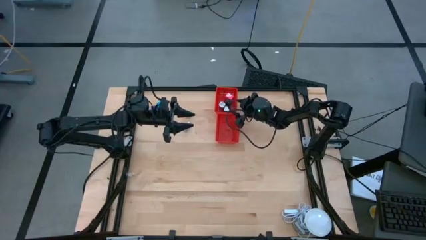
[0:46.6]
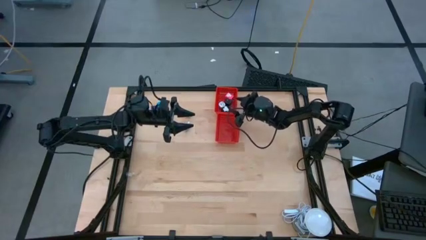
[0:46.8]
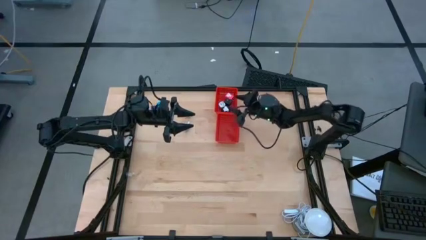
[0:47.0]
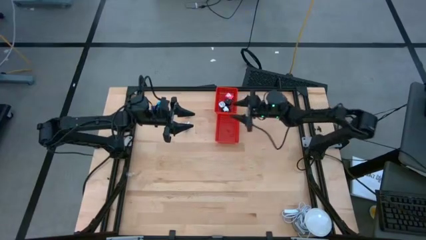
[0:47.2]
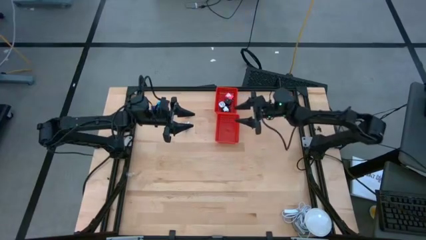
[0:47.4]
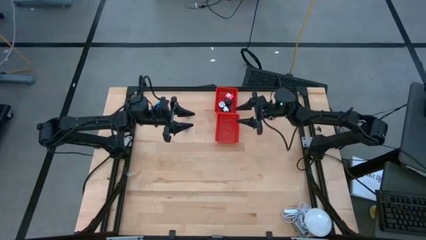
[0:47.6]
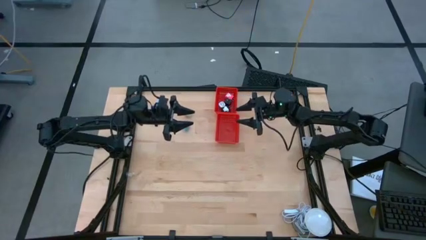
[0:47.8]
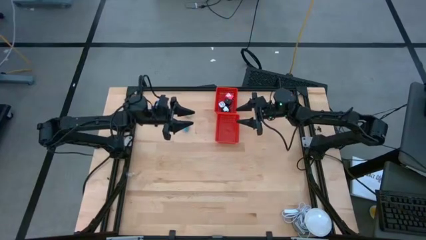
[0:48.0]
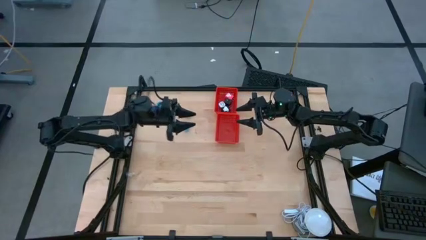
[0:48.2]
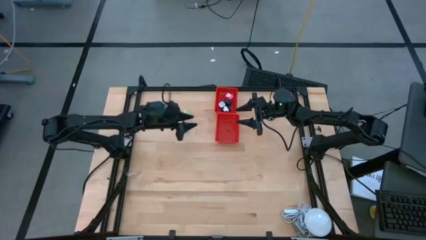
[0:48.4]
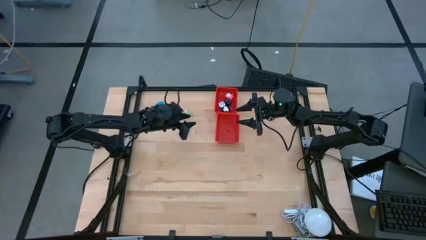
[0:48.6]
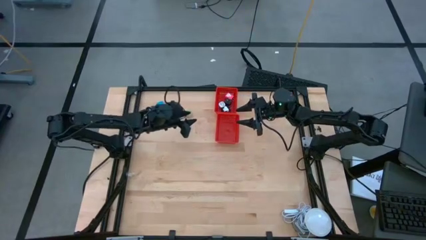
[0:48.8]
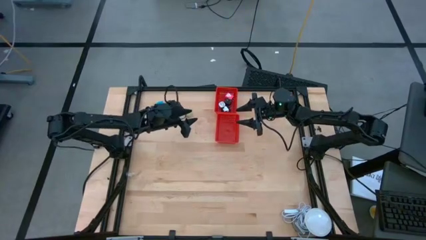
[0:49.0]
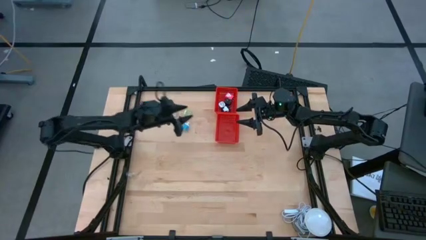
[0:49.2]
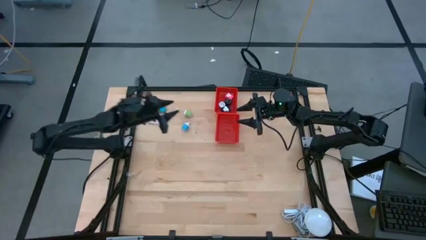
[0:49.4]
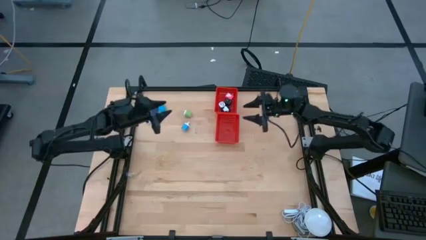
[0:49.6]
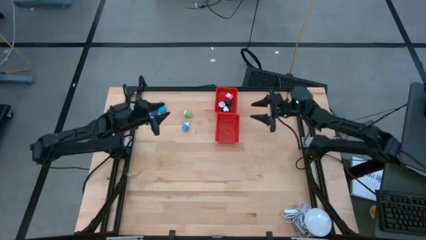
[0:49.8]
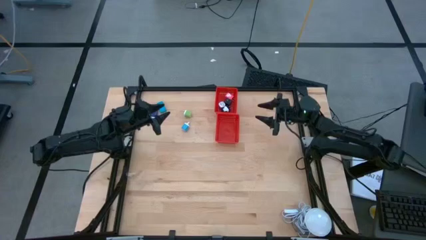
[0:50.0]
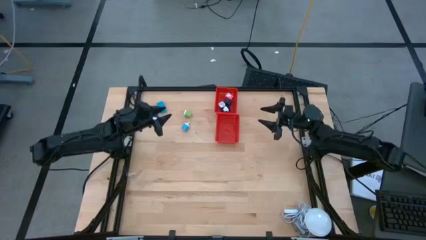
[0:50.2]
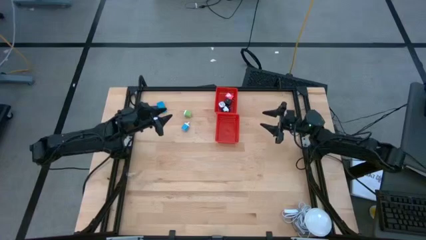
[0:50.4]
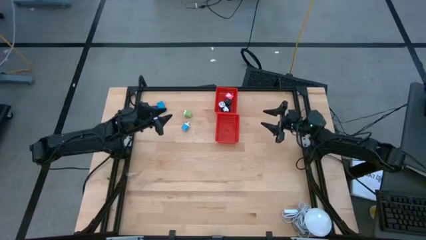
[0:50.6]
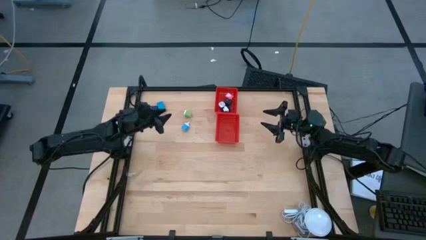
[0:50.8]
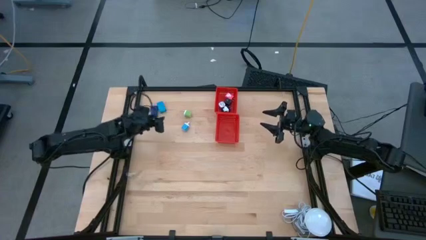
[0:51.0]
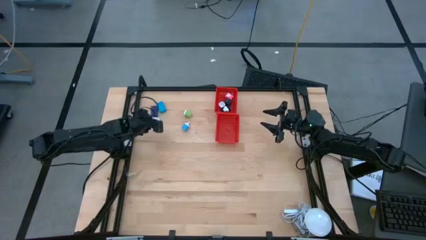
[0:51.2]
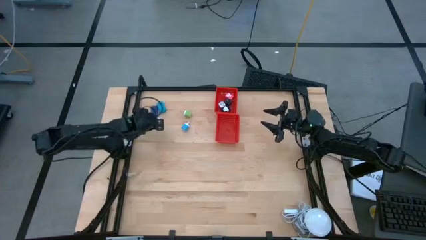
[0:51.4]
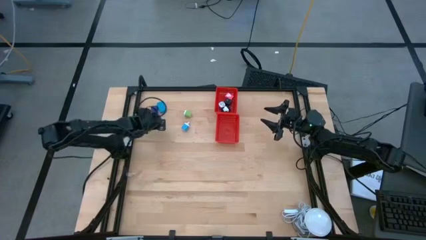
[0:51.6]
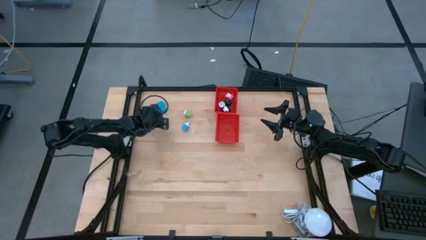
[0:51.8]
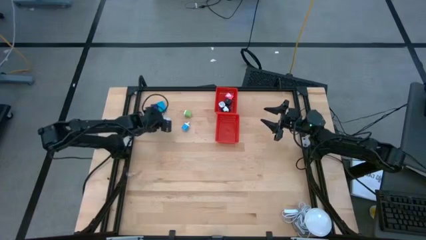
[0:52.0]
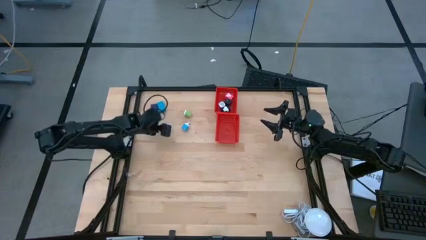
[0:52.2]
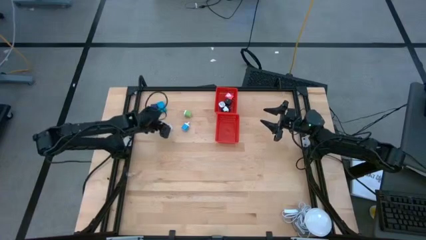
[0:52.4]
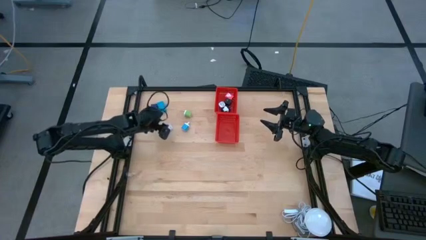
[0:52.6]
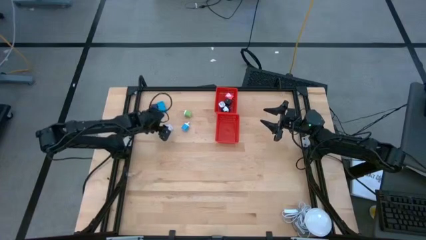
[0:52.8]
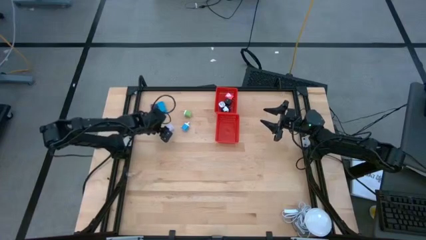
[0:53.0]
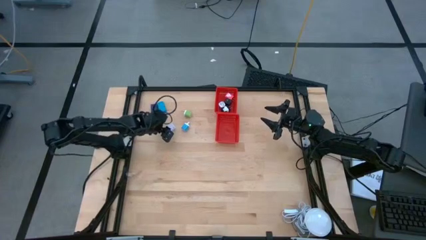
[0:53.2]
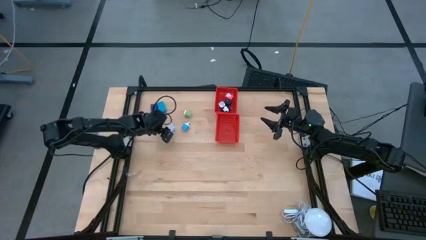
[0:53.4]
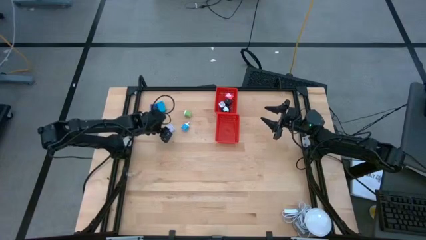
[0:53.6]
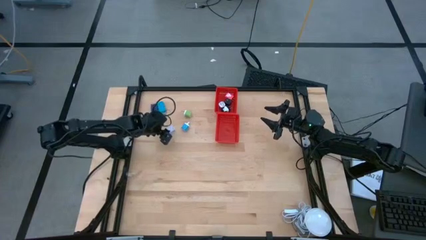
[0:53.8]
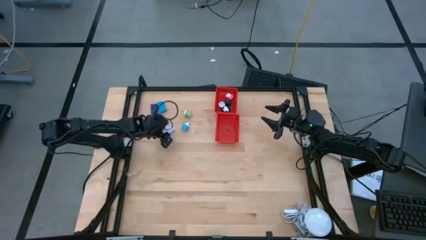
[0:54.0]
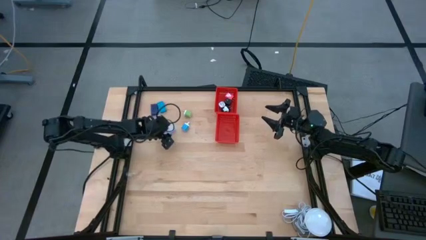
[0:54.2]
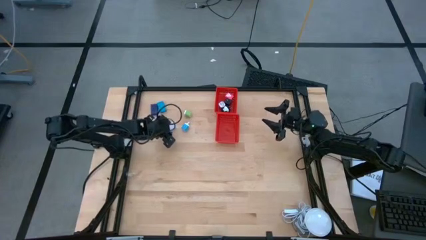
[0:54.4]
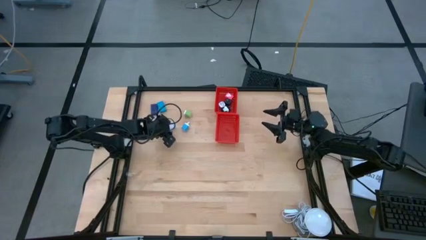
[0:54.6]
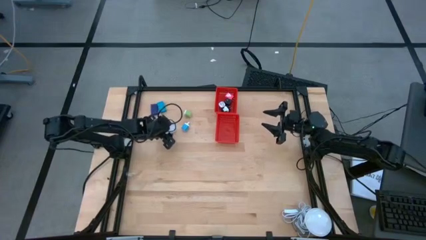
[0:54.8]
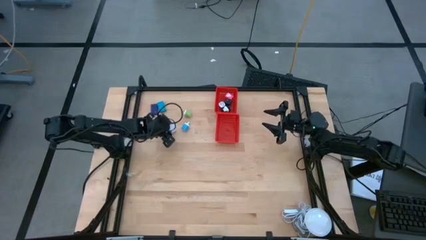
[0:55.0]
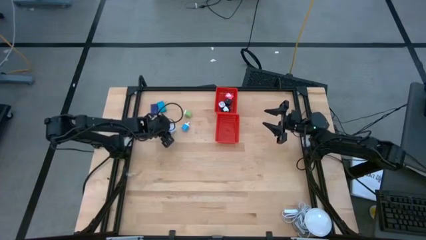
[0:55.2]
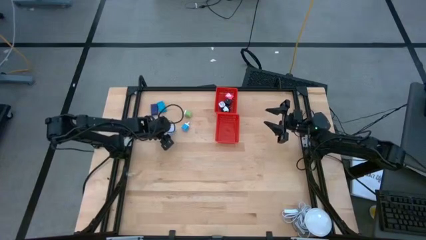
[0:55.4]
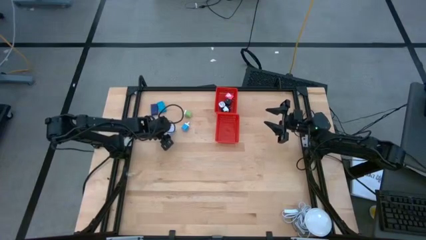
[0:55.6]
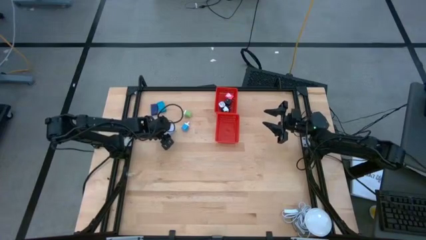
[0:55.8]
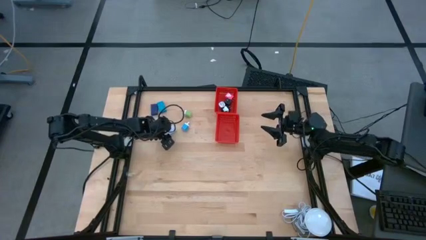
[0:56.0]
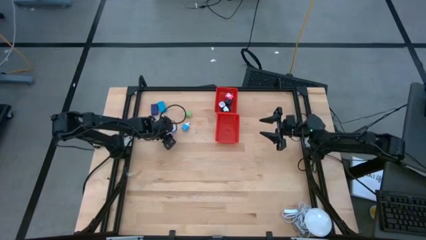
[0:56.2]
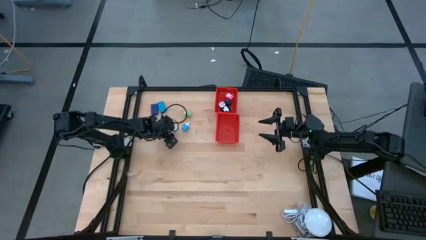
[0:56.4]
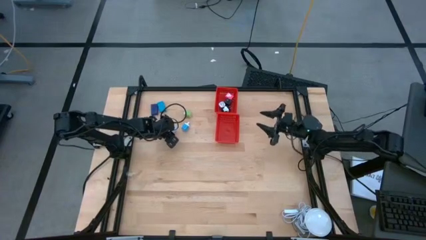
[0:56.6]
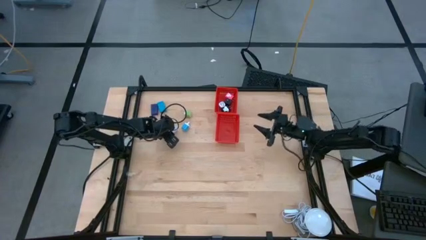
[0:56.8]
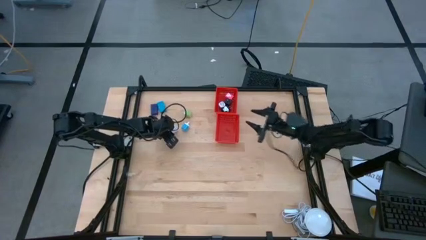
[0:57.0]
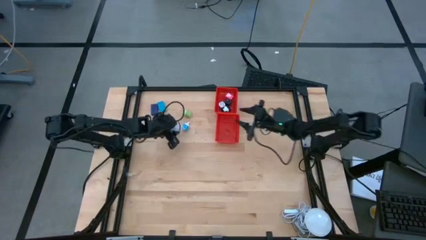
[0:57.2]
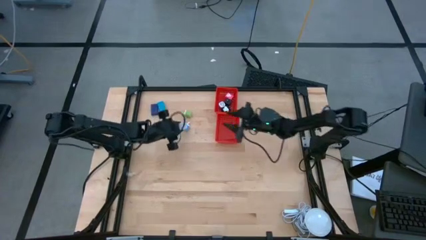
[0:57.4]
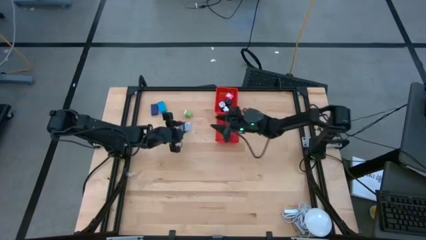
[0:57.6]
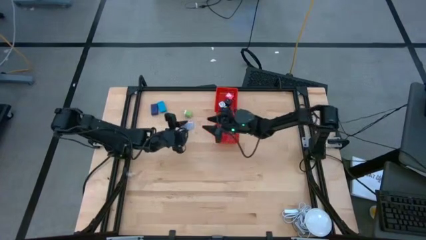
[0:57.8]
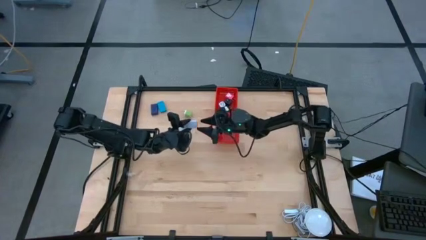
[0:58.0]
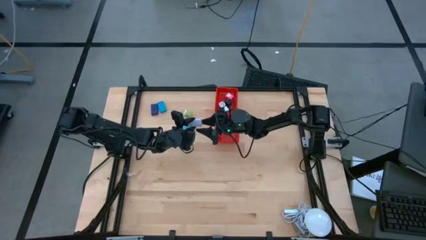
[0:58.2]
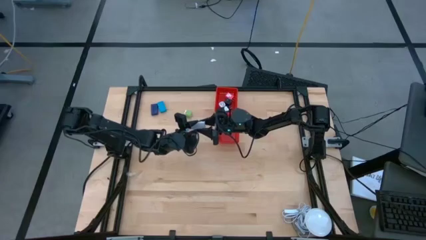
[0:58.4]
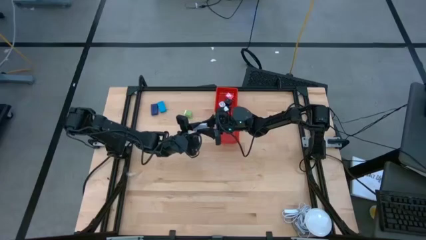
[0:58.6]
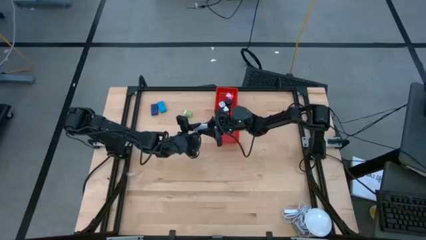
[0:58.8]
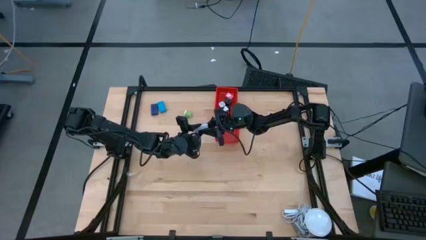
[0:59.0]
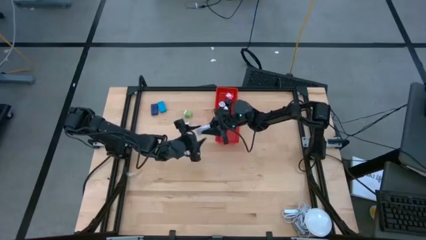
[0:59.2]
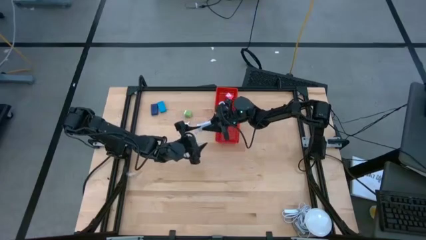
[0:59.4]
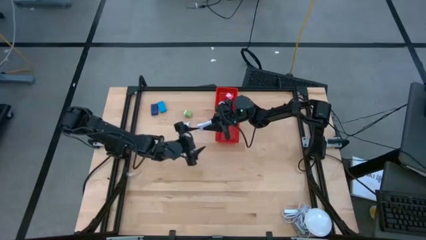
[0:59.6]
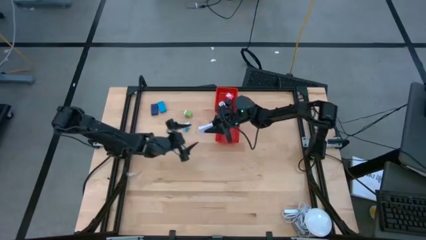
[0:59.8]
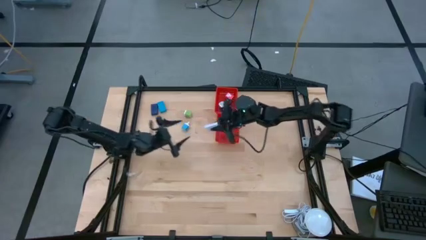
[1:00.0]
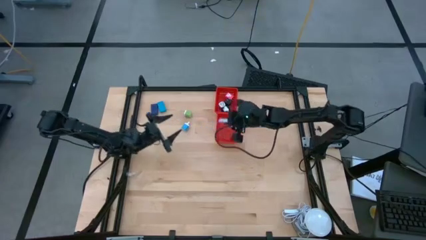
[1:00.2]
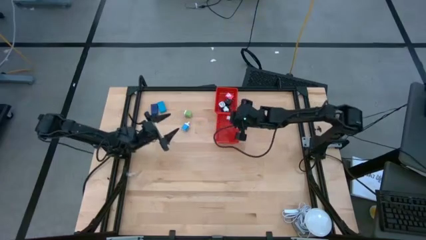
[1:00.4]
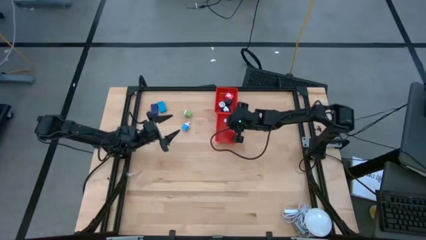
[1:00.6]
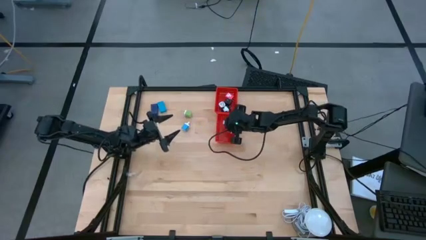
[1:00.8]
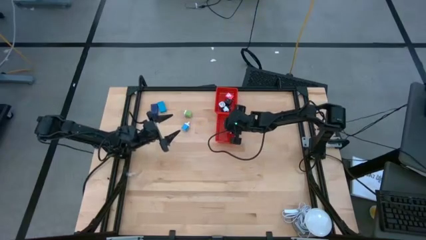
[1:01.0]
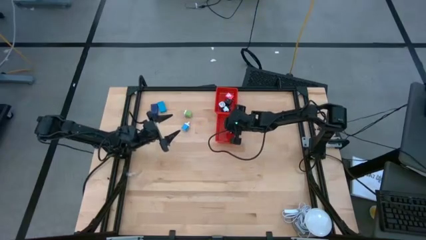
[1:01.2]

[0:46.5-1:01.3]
Task: Pick & Place Office items
Put the purple digital clock into the bottom red basket

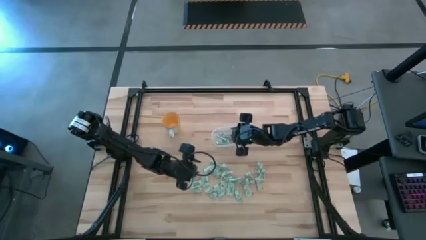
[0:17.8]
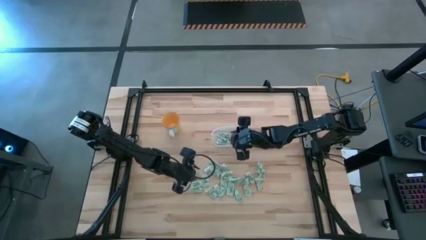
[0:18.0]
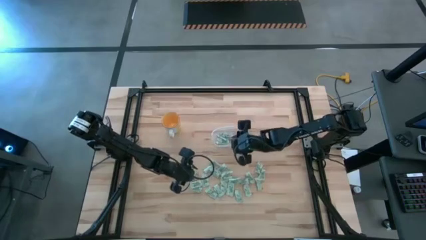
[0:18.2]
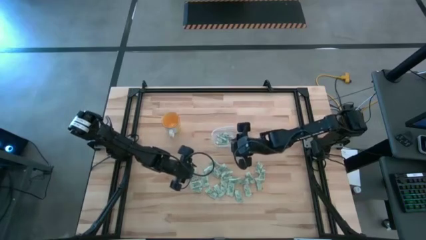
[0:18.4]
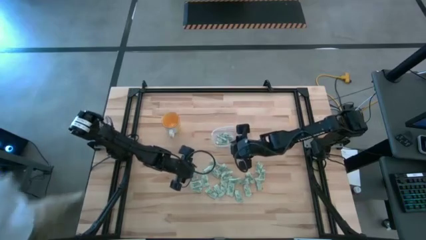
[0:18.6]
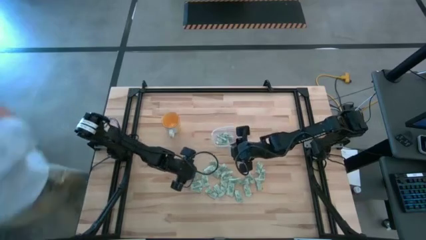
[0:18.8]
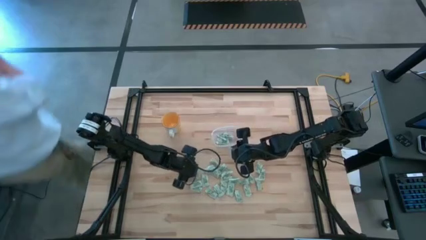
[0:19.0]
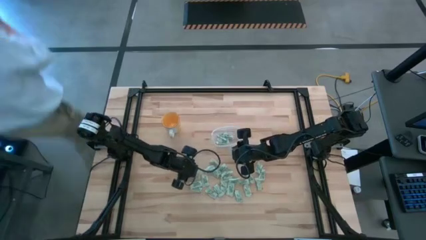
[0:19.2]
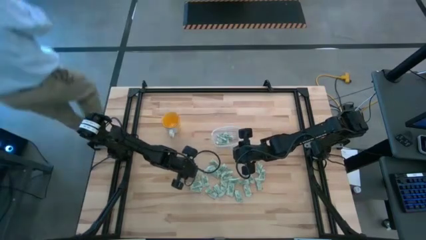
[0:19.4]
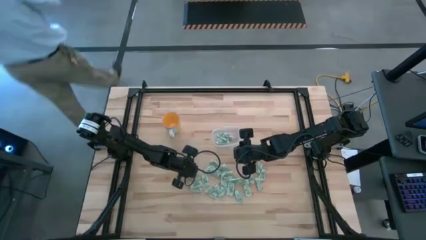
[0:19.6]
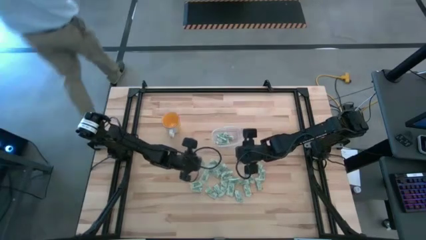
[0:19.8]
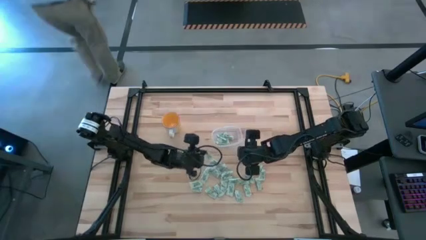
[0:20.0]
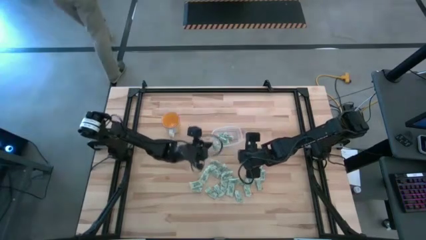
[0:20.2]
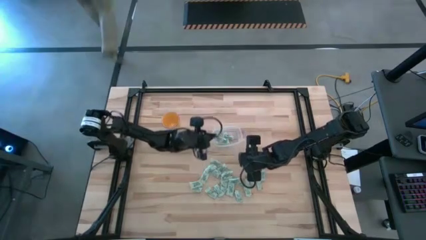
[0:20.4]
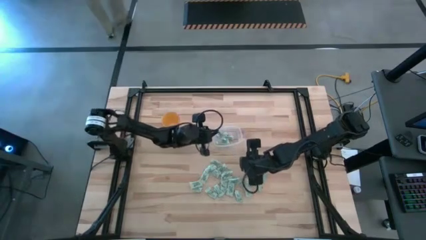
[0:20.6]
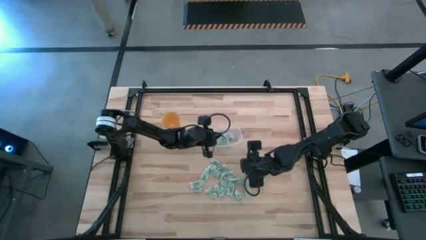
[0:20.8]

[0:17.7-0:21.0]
Task: Pick and place Stevia / Truvia into bins
Put the stevia packet into the transparent bin
